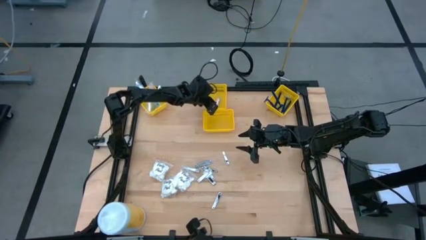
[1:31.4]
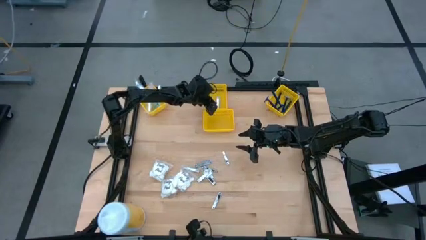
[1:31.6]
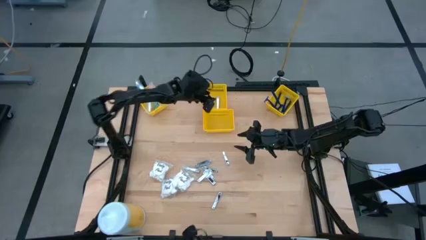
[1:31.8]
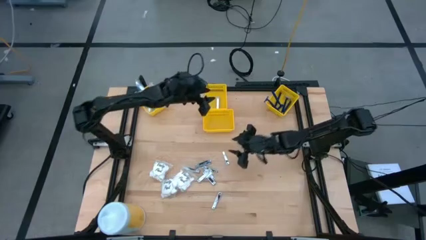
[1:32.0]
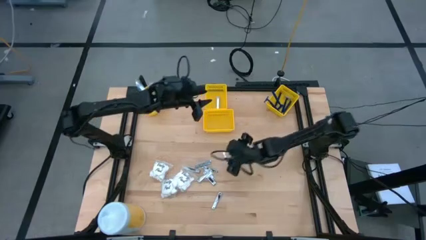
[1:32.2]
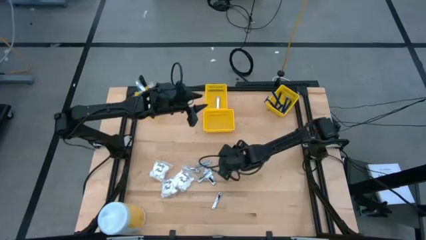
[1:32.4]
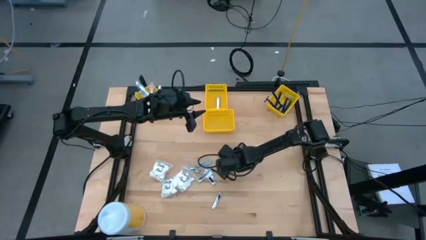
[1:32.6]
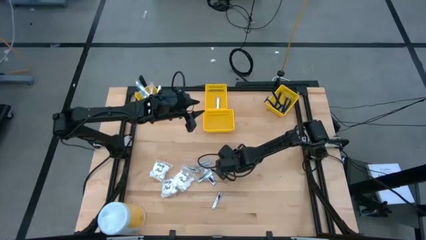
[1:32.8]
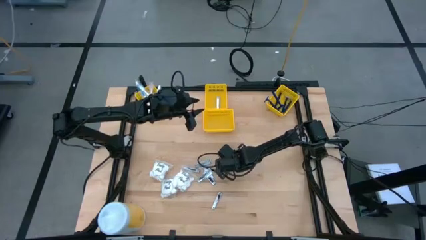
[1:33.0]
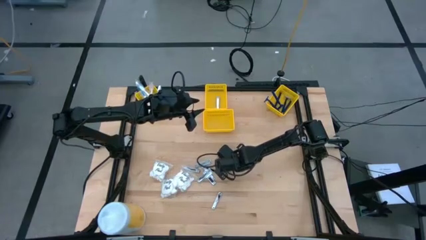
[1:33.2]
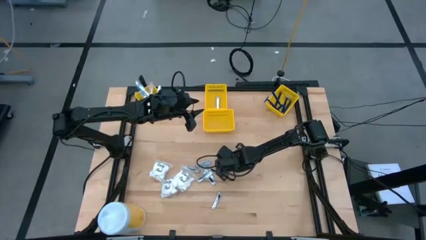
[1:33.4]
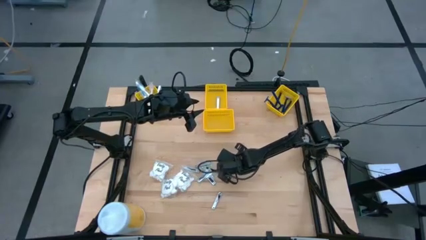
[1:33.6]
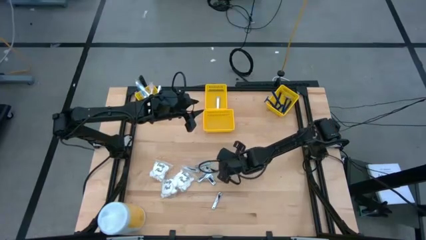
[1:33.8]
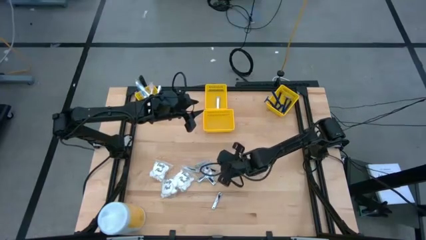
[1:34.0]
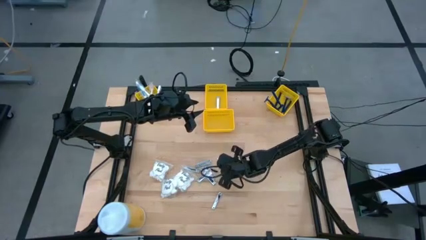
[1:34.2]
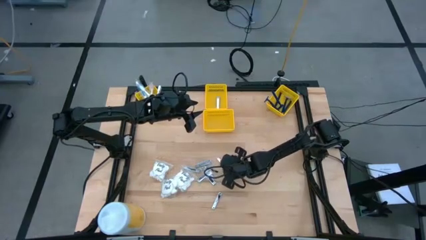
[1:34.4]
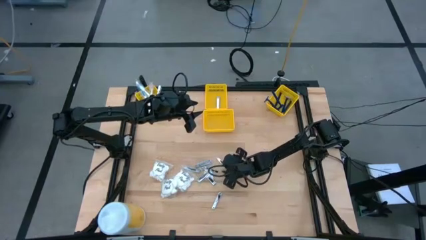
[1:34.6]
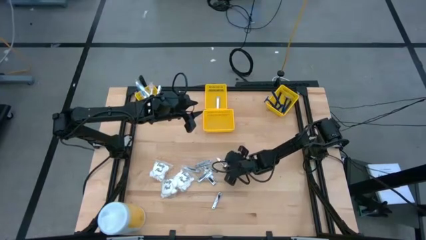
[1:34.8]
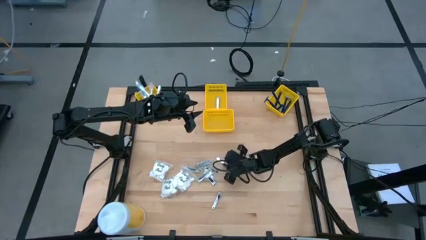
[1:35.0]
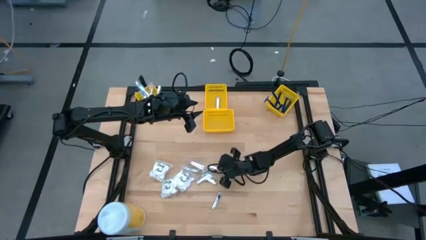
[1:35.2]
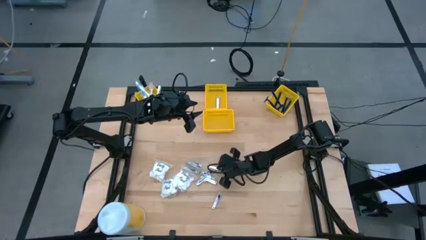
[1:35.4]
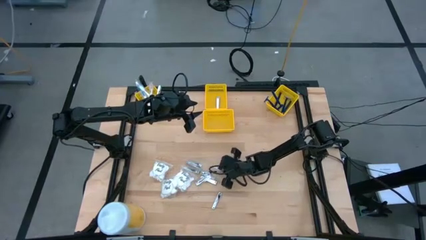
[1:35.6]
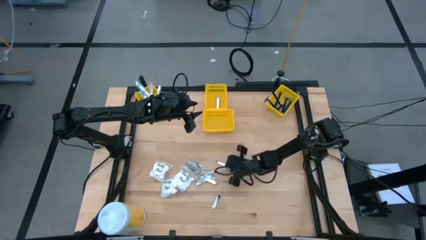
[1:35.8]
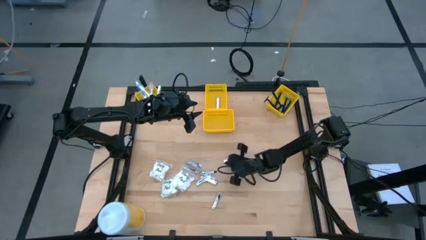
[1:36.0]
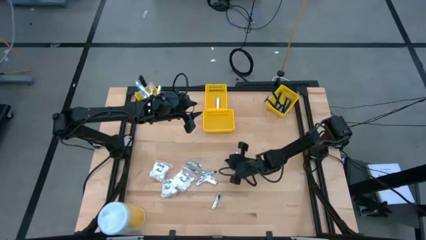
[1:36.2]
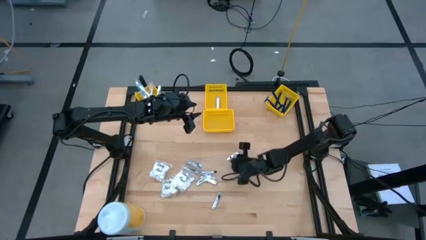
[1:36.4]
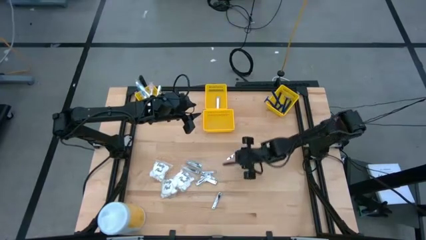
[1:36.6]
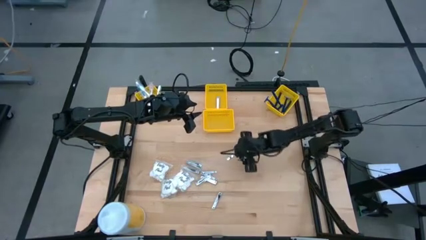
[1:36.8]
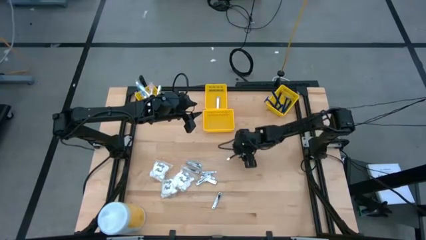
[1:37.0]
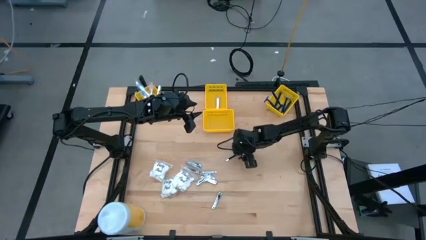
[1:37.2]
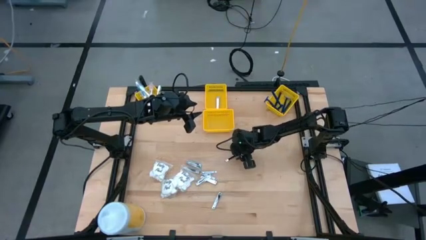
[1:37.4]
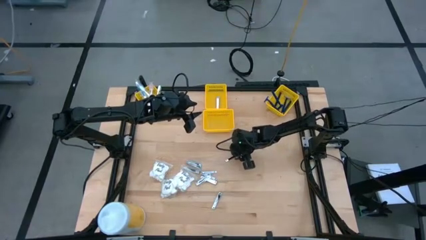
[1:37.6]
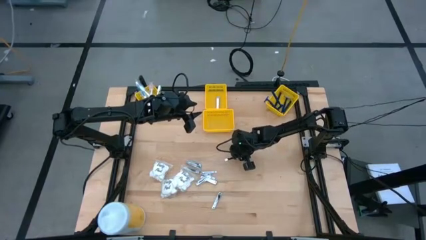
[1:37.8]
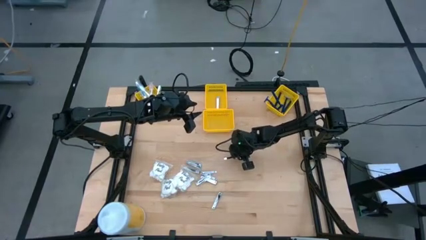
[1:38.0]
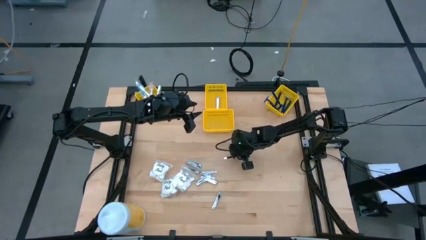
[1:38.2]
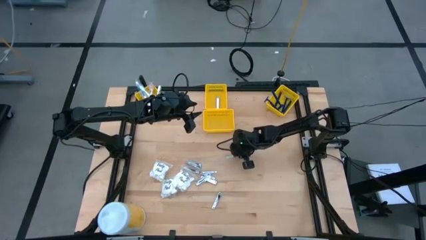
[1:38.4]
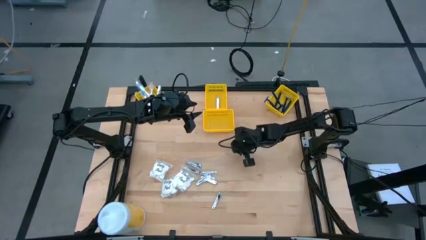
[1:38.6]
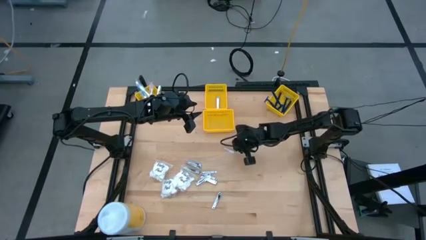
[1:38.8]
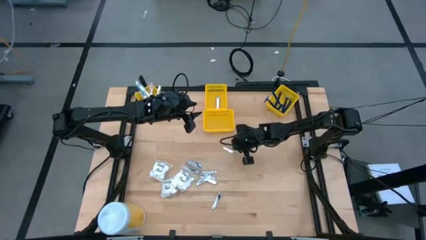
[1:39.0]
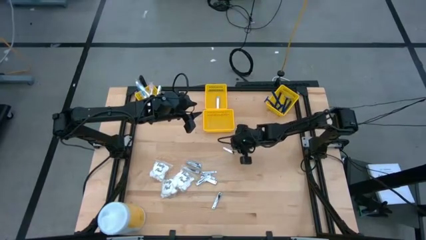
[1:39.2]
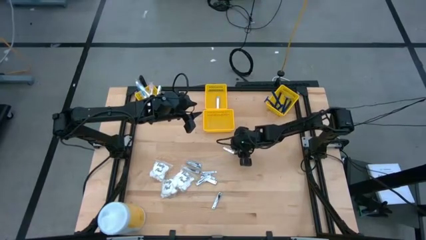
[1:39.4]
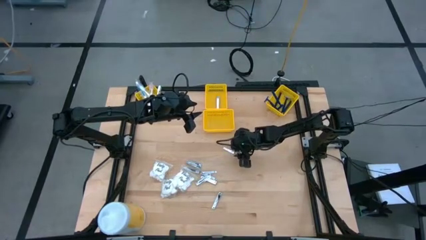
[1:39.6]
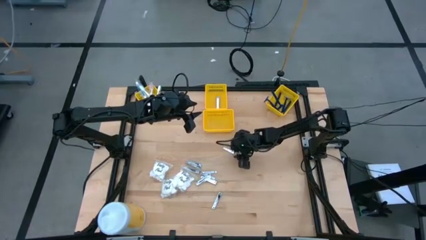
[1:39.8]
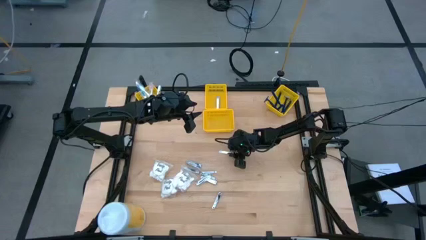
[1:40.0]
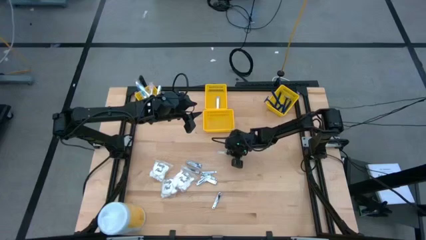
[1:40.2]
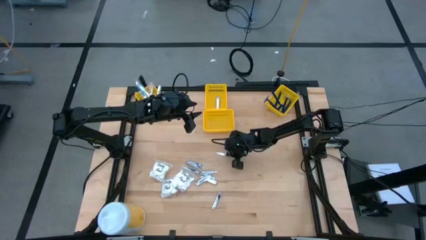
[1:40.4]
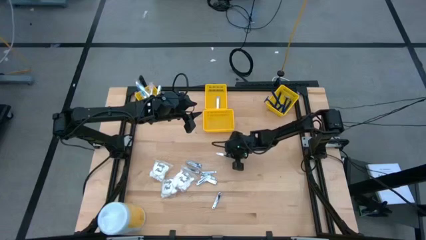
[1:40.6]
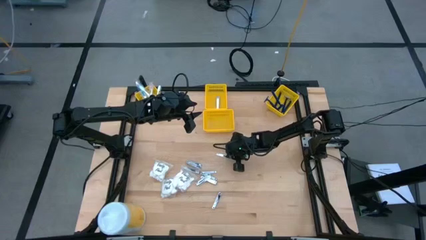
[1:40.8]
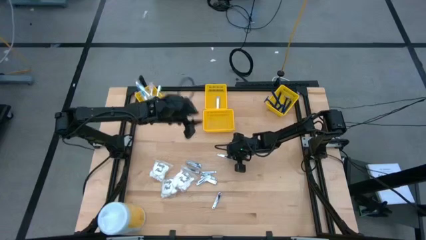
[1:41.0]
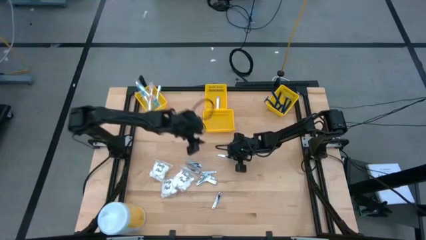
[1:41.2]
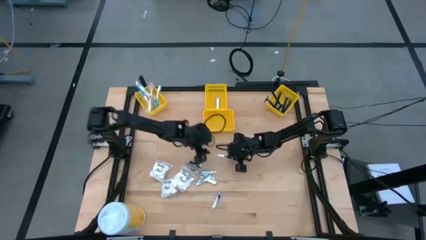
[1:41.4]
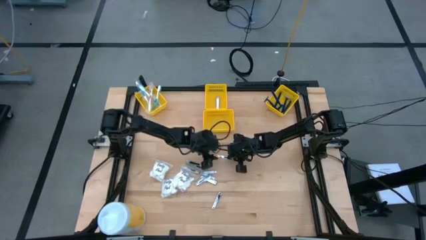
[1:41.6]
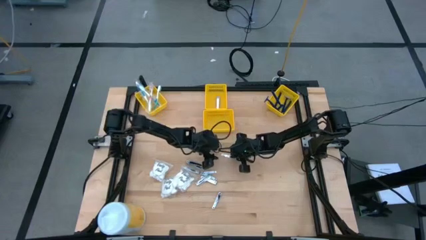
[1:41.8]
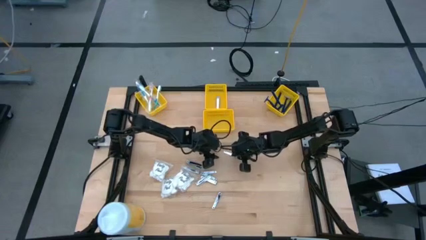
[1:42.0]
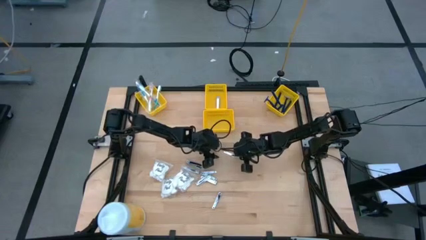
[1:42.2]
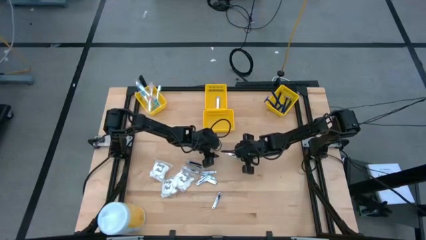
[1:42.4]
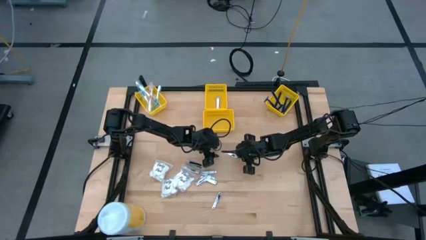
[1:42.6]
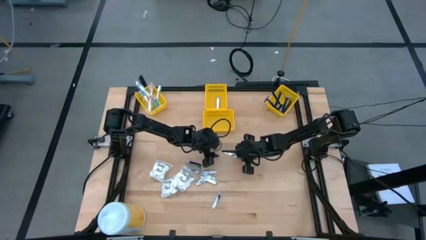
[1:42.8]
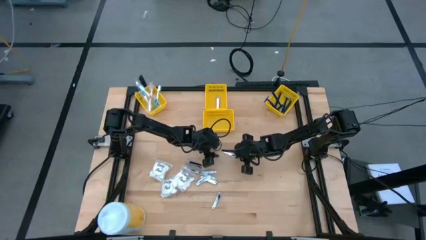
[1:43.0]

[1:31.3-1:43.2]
Task: Pick & Place Travel size toiletries
Put the nail cutter into the top middle yellow bin

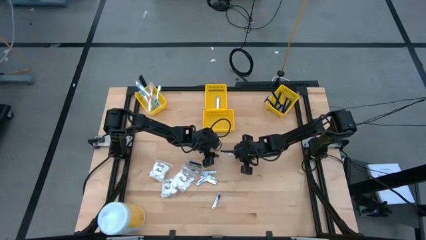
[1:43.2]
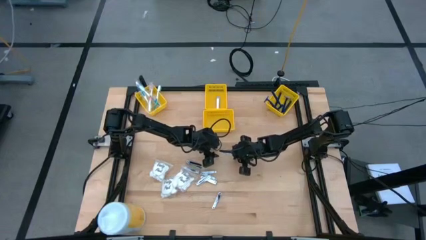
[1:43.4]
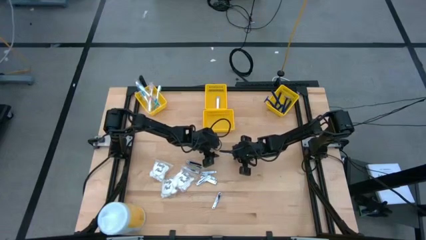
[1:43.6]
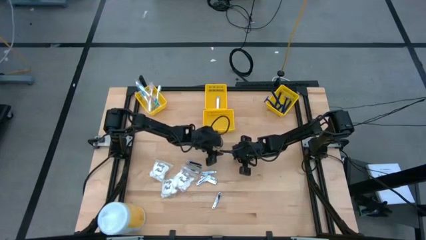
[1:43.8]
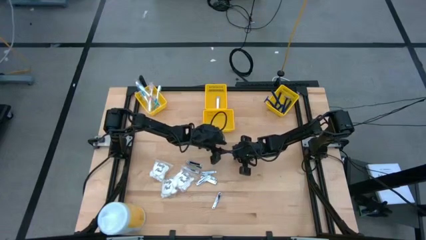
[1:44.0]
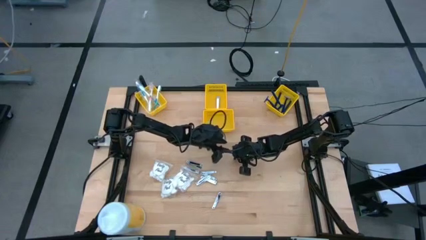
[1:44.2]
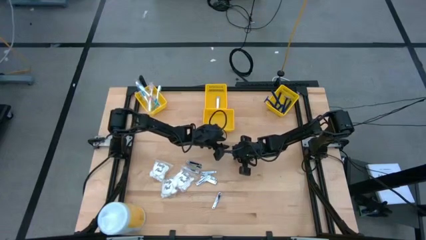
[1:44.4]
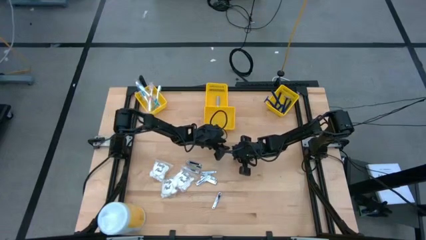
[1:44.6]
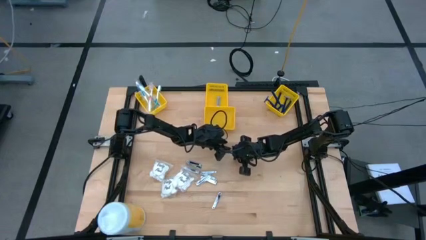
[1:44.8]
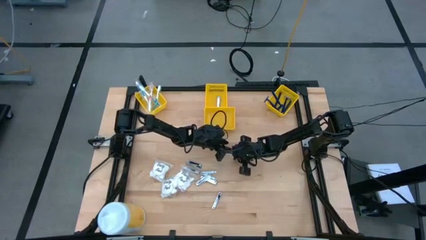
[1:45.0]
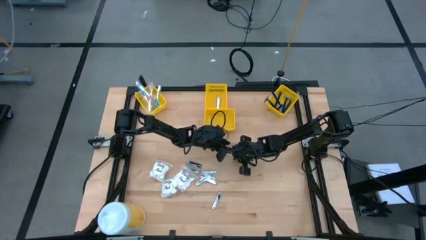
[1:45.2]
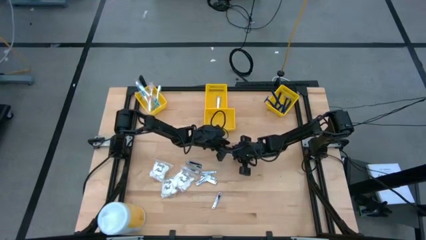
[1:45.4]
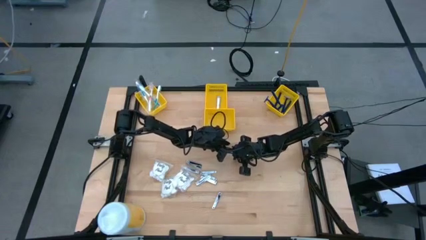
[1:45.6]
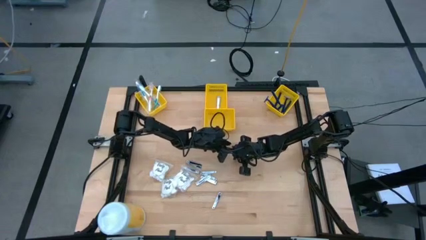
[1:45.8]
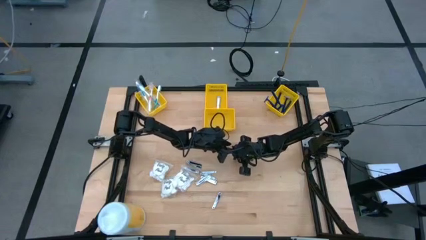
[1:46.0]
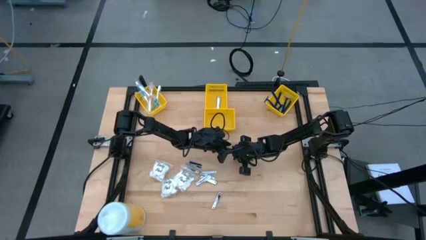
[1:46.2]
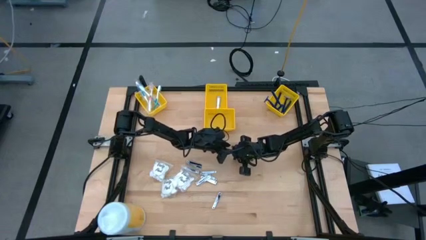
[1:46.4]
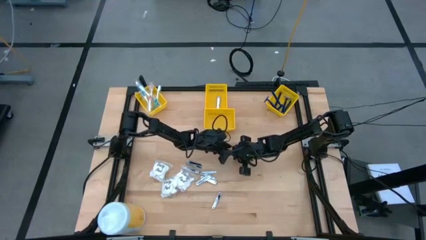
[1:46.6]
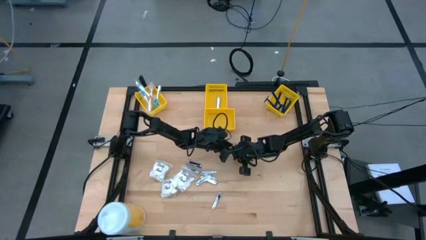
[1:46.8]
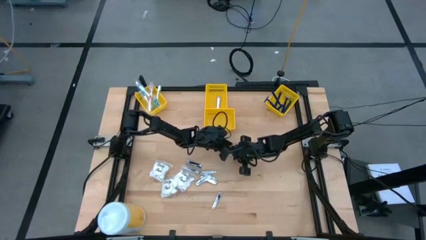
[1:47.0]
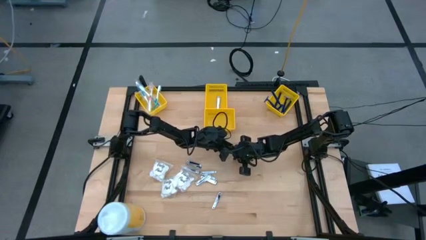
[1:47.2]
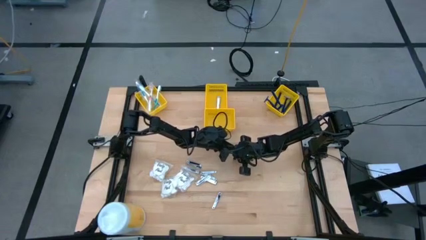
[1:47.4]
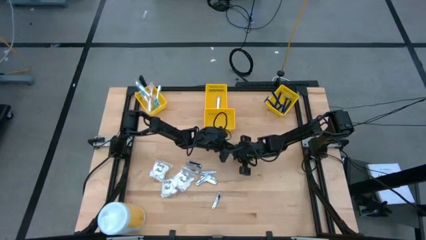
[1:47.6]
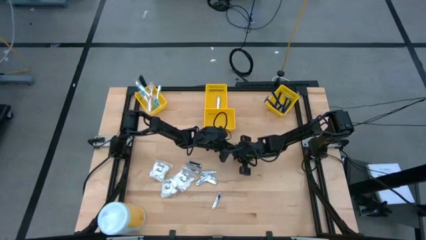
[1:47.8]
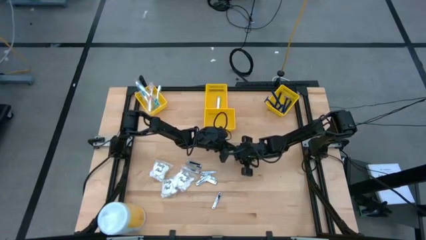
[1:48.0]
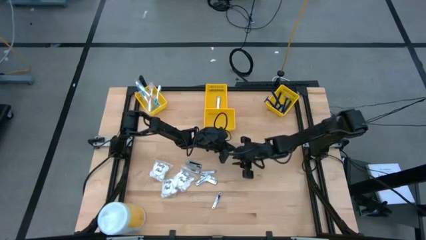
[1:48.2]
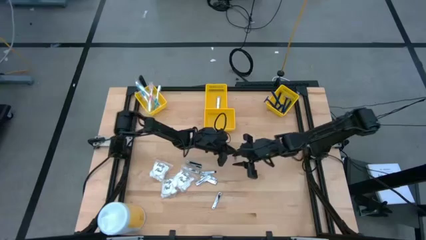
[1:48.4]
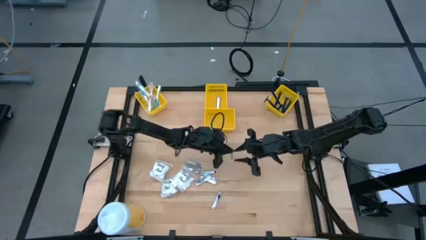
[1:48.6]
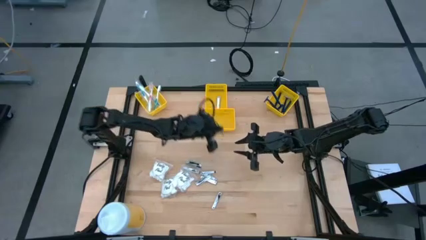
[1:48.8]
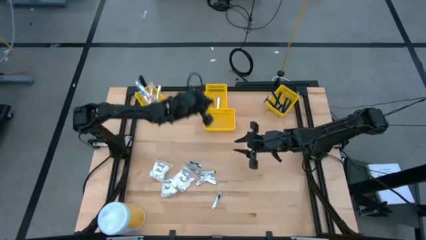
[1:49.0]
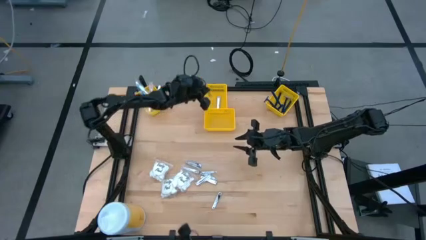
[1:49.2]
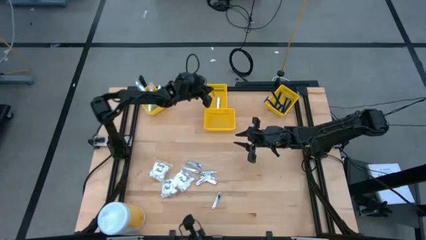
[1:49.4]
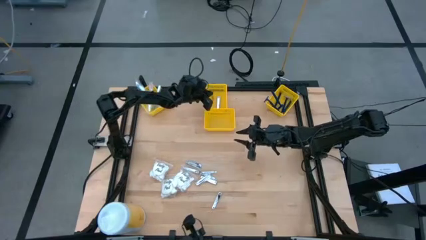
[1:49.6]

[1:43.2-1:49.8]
Put the nail cutter into the top middle yellow bin
